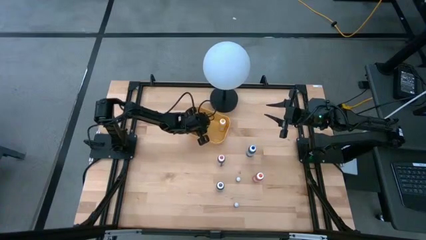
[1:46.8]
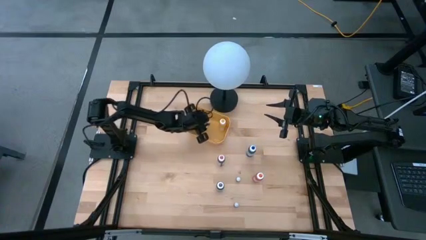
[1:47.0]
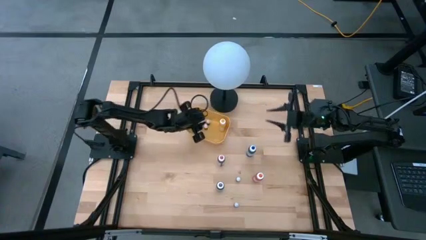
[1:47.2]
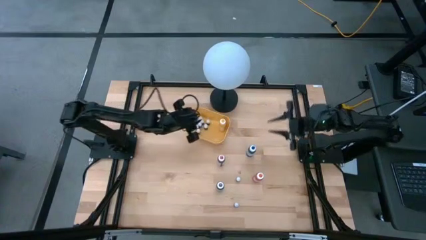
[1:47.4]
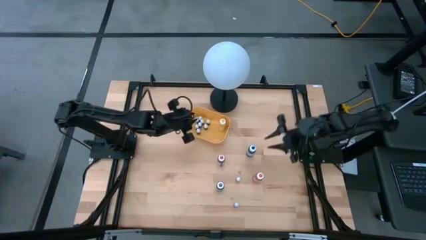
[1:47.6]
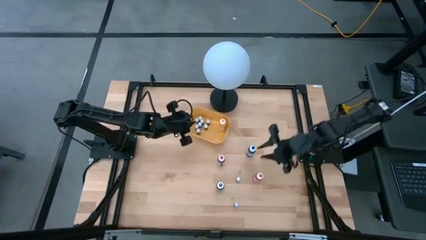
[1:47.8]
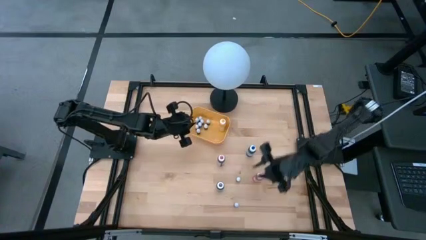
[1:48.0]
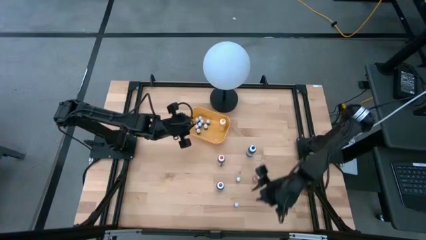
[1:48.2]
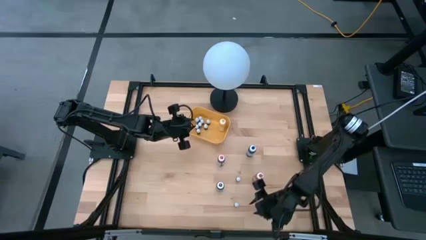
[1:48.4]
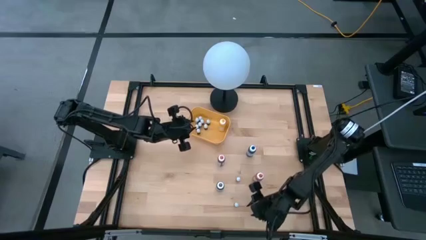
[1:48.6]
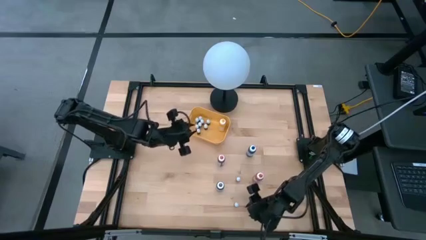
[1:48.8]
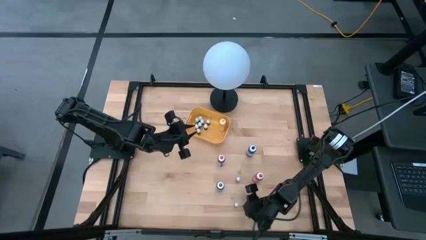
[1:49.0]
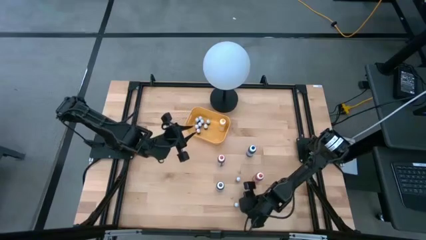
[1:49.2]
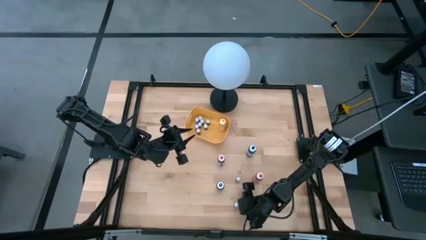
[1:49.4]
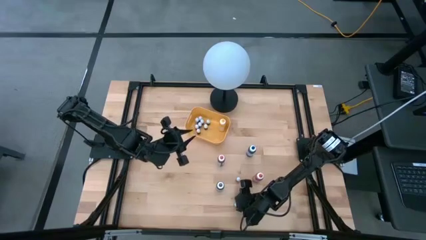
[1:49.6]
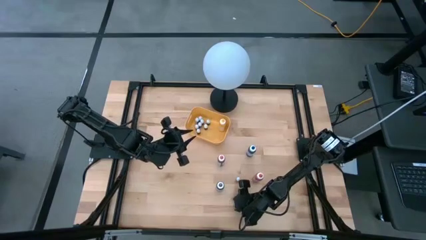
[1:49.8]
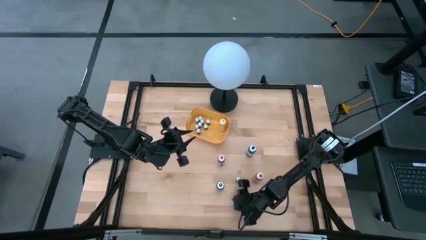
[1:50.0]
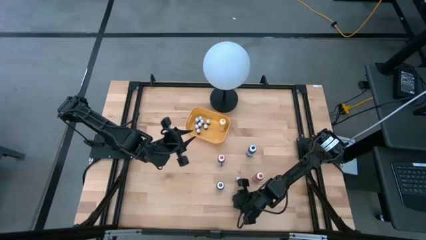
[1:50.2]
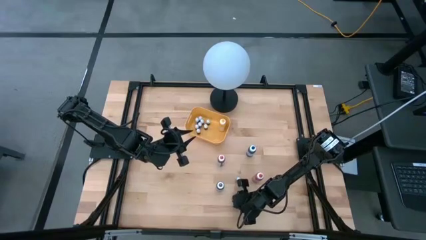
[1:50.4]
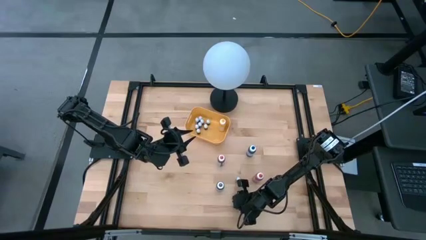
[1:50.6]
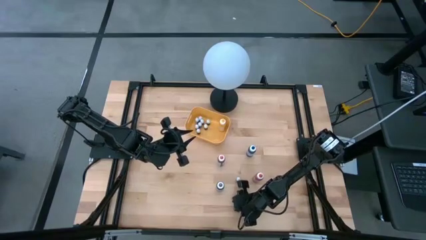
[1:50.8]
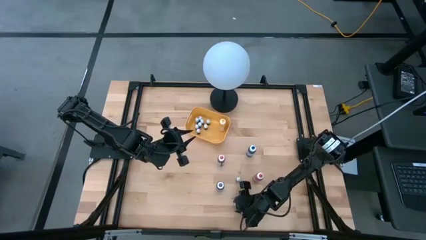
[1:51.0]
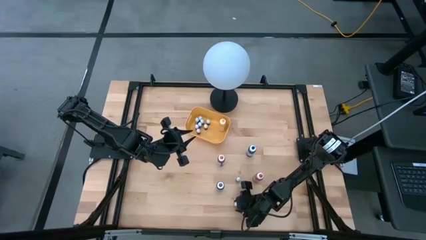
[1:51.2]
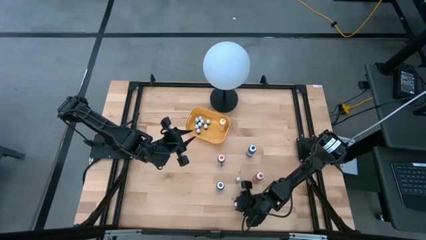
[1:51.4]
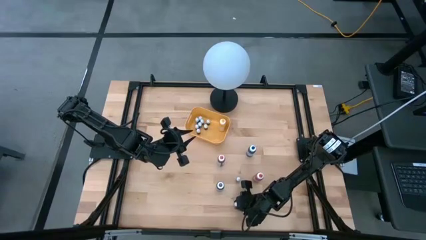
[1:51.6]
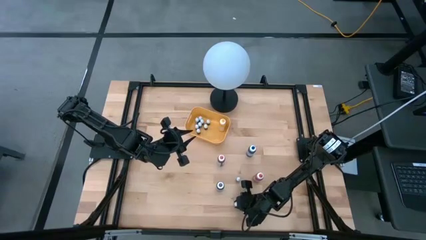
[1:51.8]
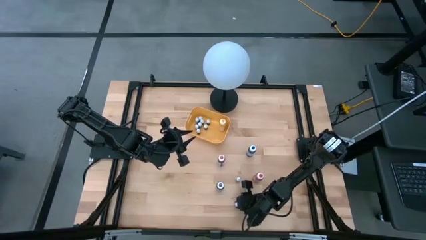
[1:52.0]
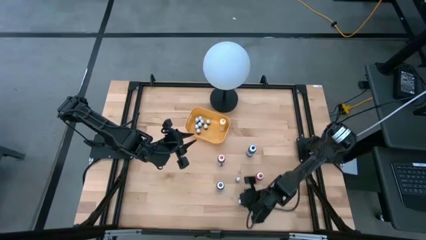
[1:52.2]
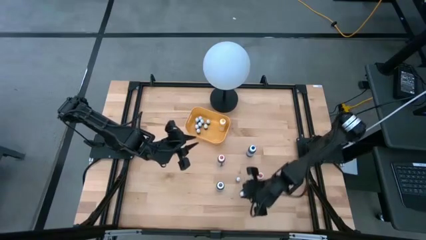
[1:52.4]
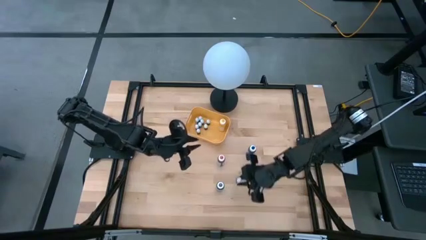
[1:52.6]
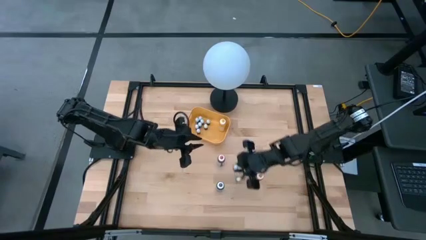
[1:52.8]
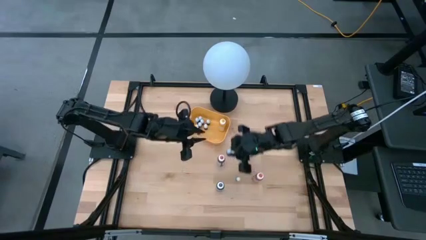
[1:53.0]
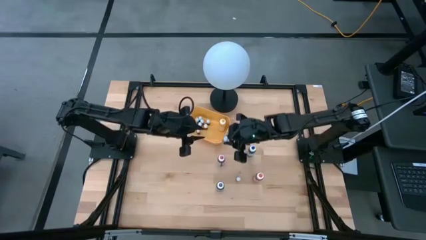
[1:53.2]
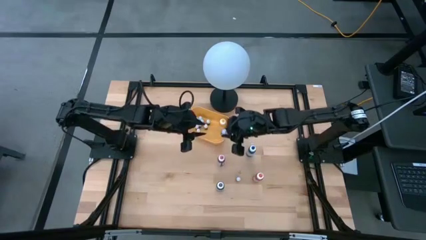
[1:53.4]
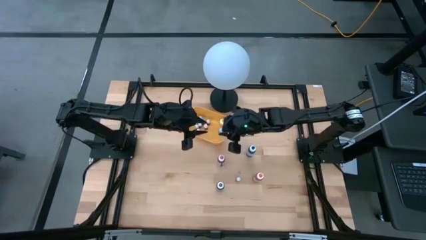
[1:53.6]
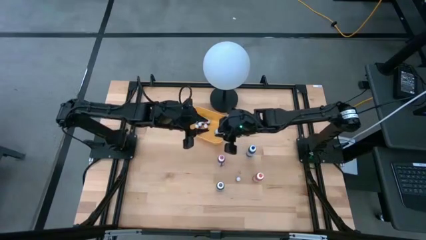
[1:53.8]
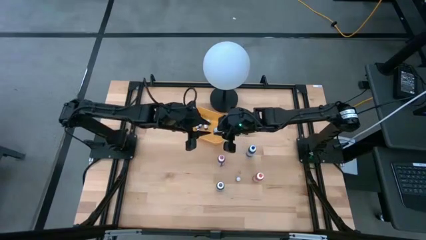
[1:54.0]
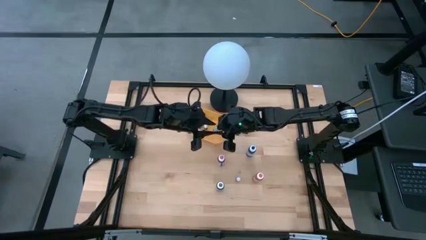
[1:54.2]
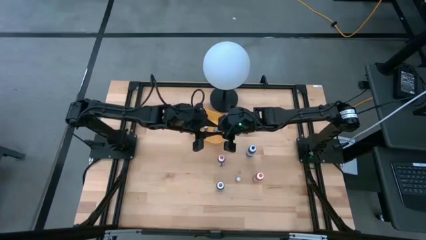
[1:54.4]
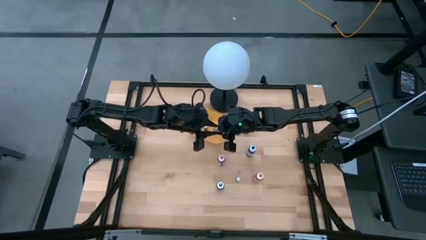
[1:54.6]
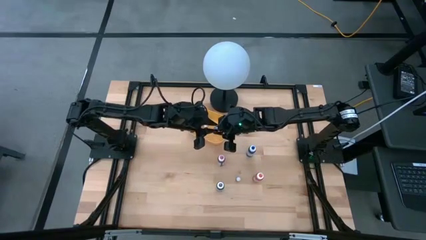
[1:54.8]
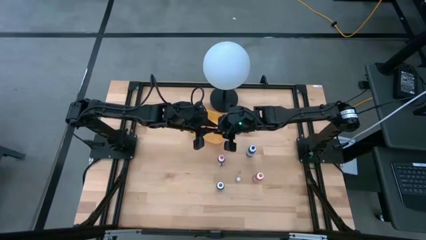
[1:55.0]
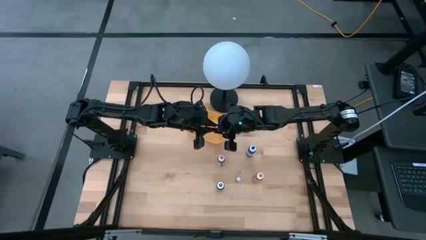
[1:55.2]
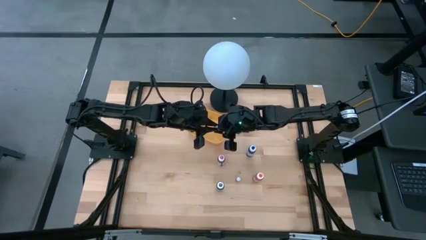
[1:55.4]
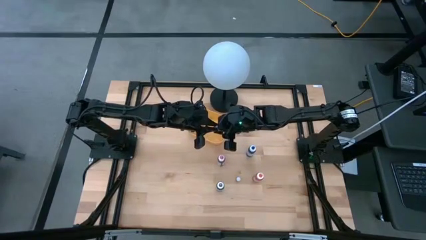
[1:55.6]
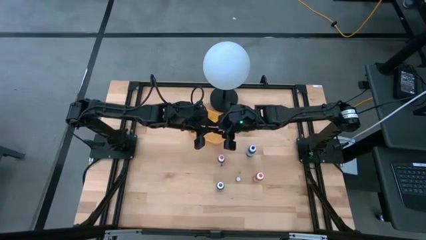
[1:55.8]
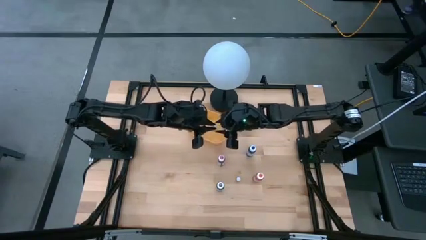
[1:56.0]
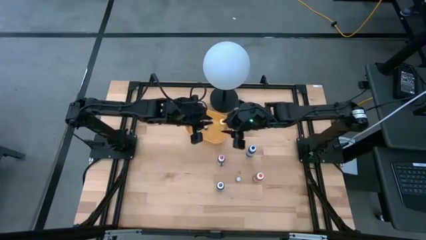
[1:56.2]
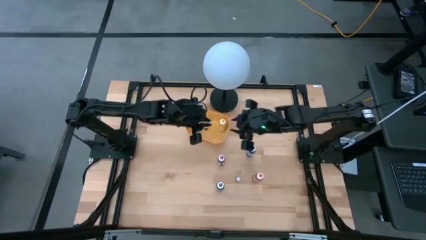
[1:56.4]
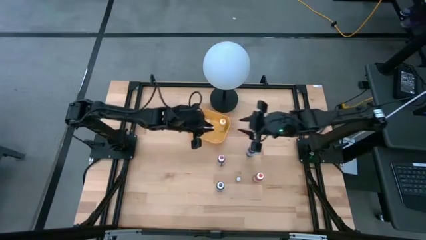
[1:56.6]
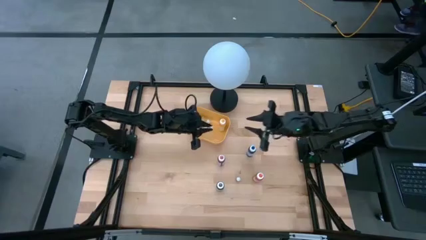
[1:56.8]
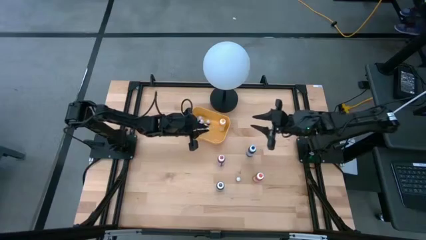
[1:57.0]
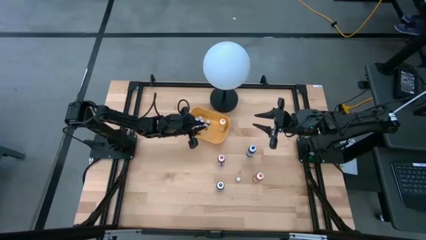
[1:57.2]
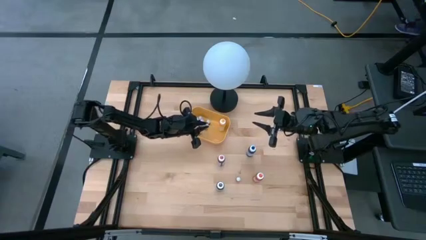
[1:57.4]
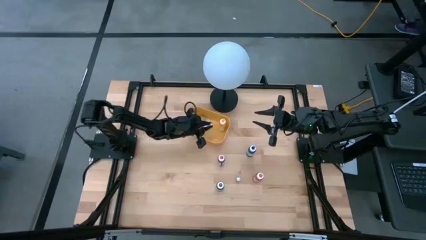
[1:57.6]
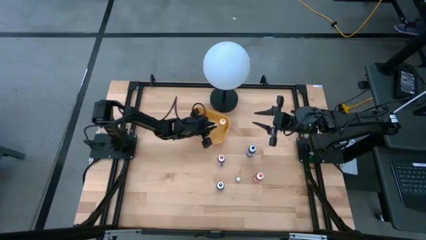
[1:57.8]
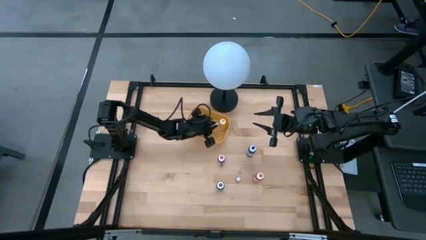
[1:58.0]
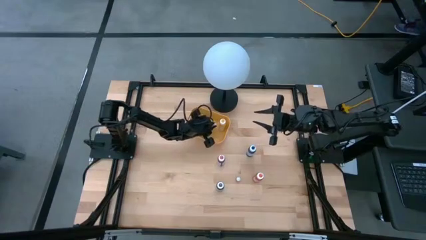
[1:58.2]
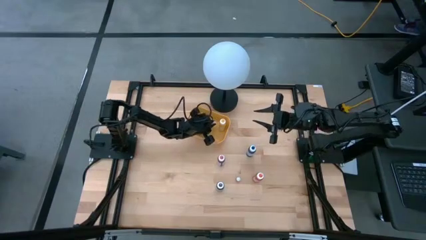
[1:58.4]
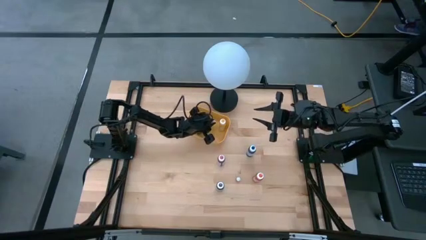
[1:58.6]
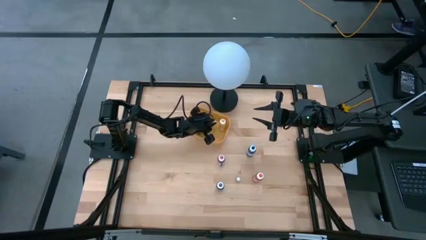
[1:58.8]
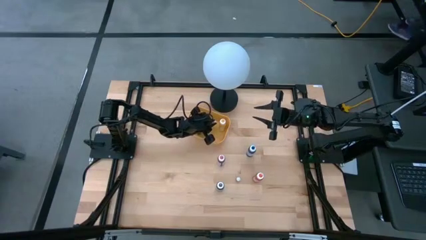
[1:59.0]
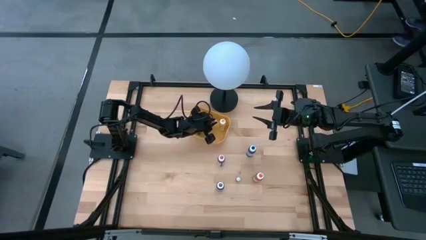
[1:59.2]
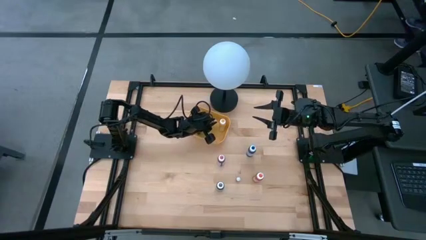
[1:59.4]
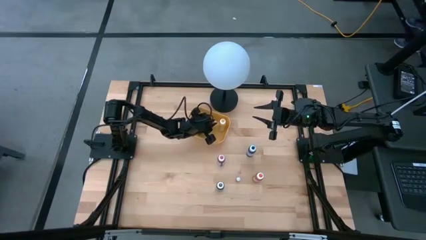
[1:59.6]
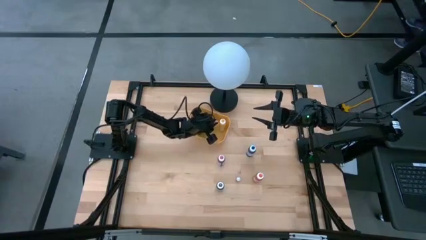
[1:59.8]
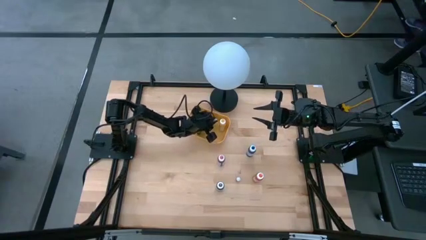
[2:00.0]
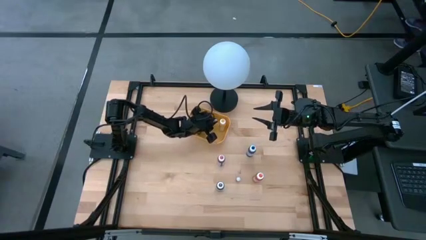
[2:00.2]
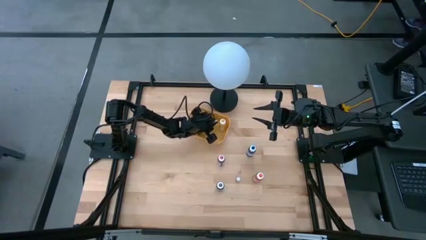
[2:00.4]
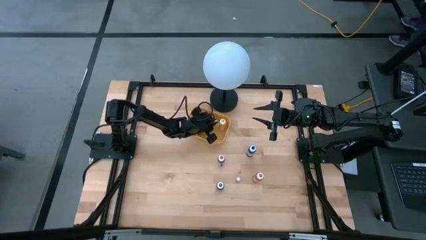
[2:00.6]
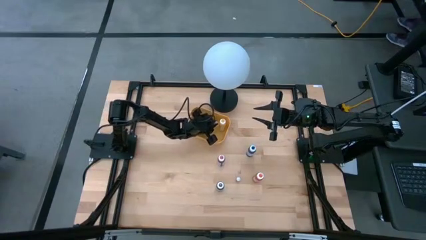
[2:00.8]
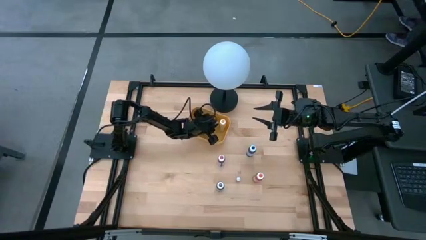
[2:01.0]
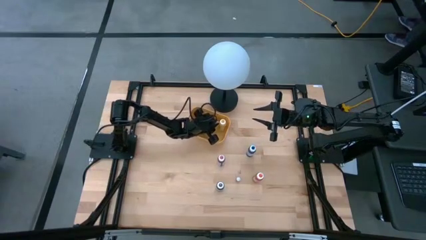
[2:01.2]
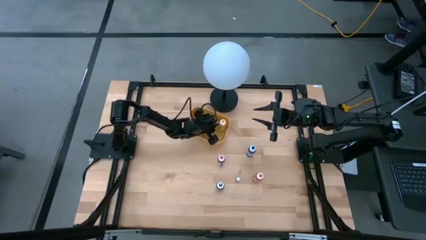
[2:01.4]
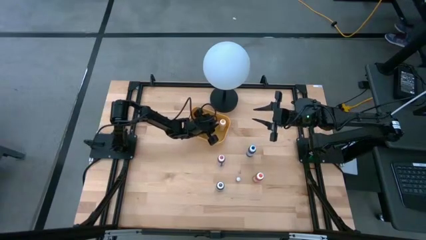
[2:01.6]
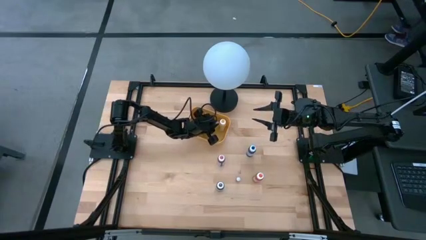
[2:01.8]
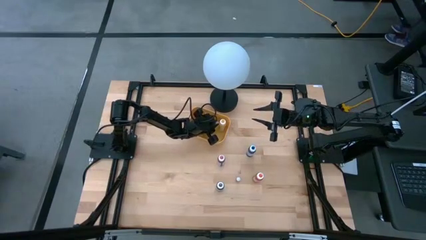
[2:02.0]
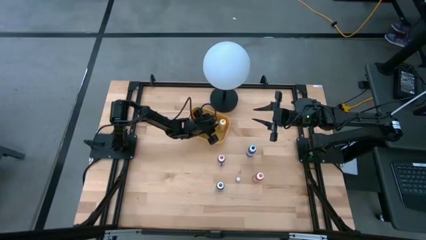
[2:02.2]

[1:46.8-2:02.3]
Task: Pick & Place food coloring
Put the small red food coloring bottle into the yellow bin
